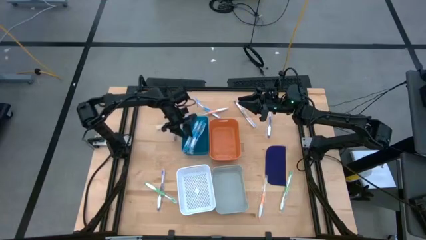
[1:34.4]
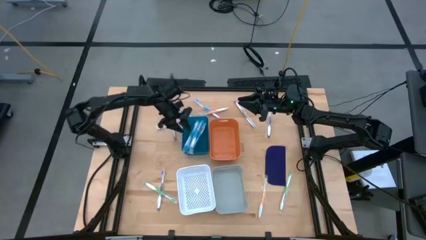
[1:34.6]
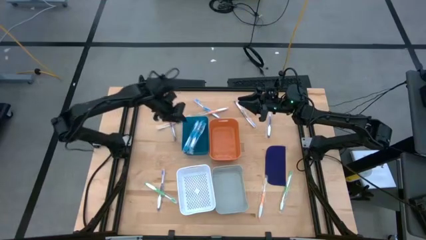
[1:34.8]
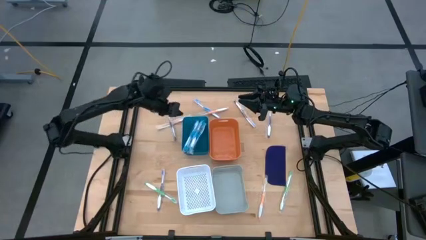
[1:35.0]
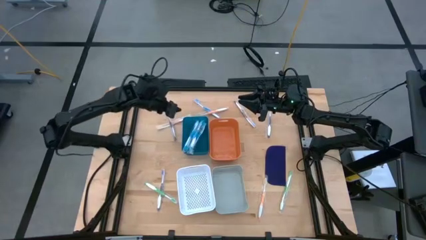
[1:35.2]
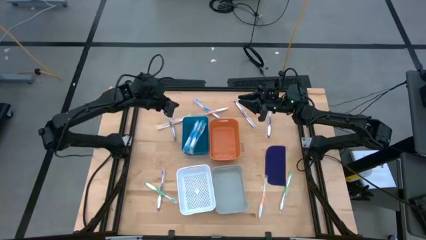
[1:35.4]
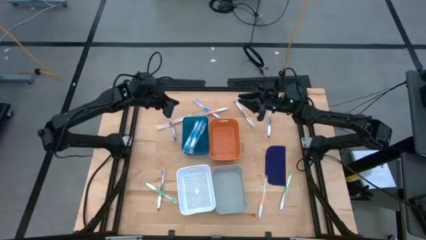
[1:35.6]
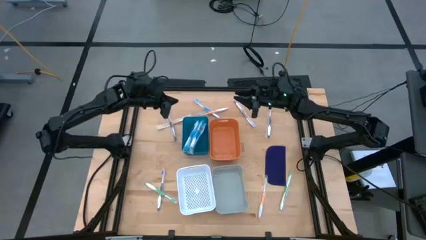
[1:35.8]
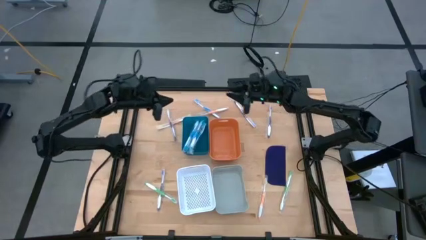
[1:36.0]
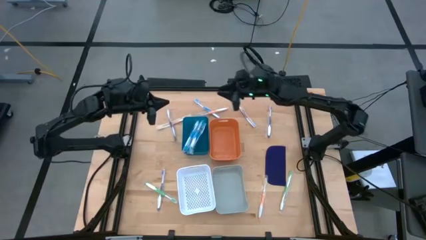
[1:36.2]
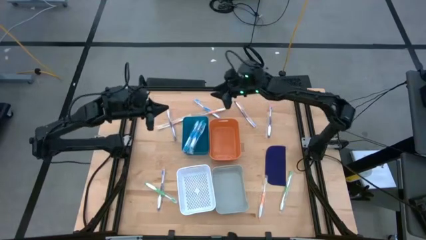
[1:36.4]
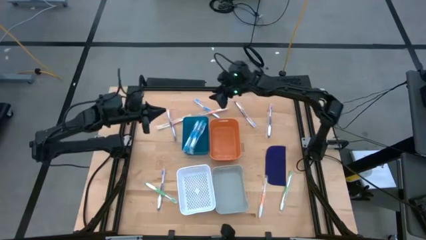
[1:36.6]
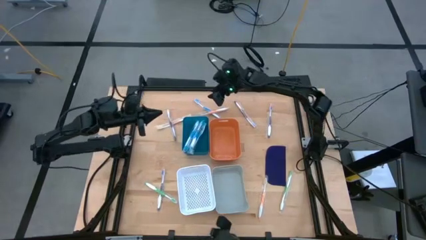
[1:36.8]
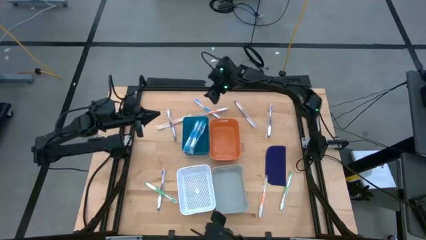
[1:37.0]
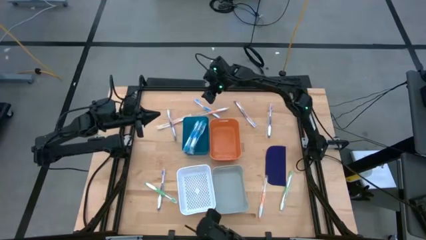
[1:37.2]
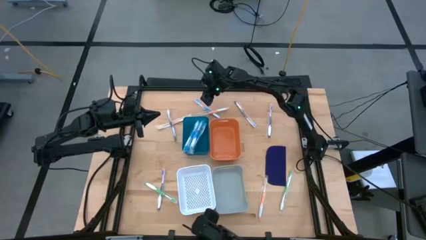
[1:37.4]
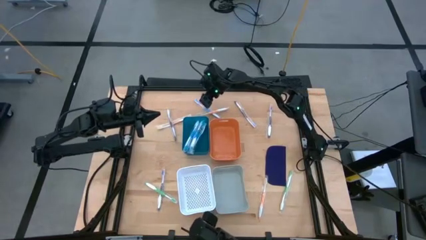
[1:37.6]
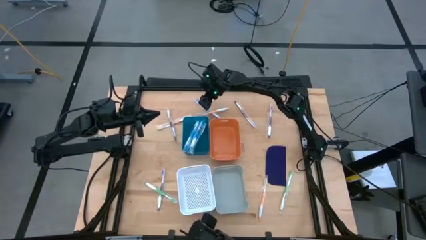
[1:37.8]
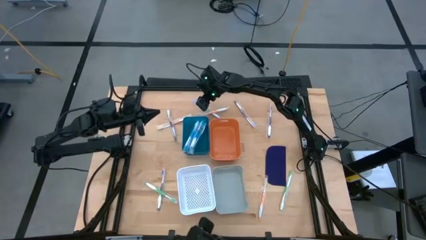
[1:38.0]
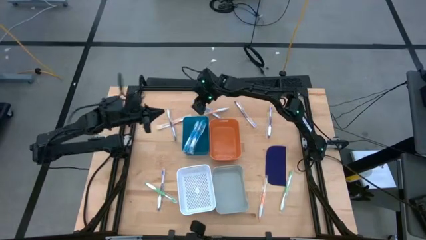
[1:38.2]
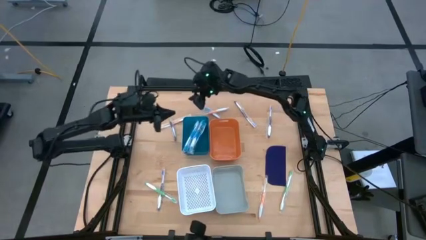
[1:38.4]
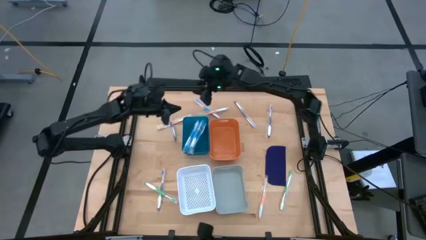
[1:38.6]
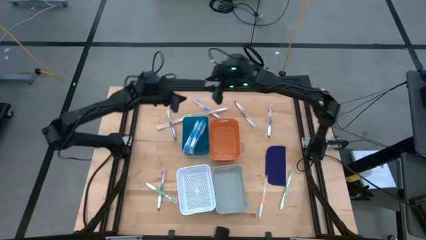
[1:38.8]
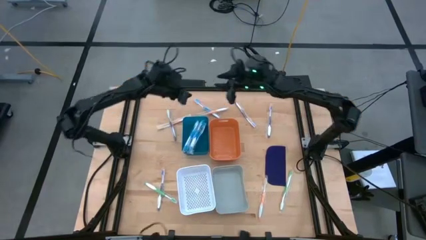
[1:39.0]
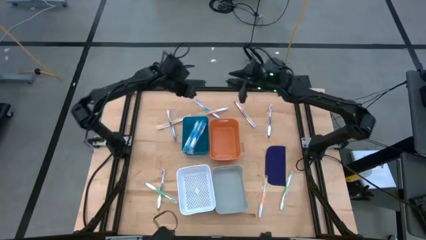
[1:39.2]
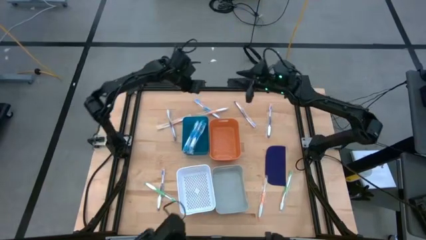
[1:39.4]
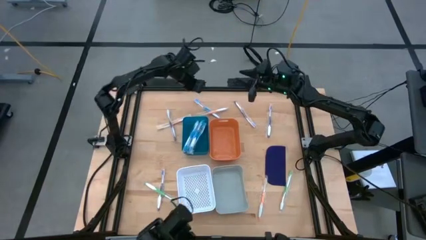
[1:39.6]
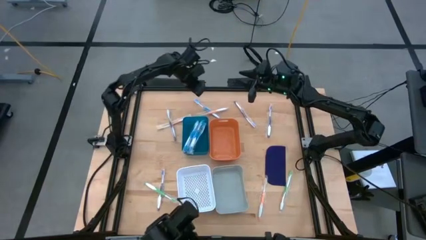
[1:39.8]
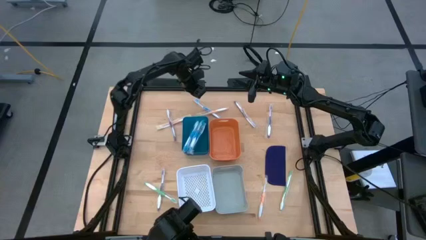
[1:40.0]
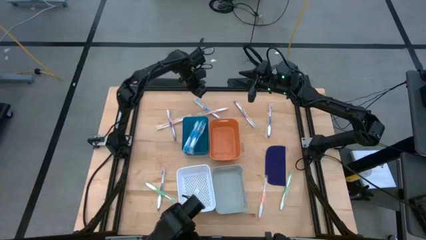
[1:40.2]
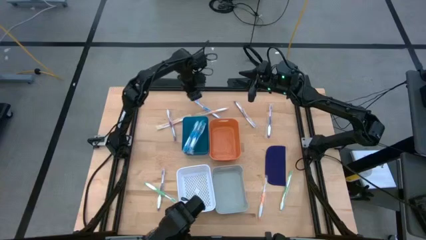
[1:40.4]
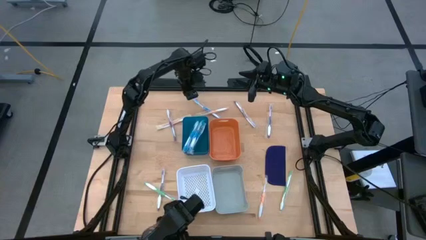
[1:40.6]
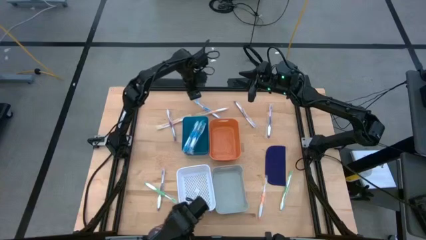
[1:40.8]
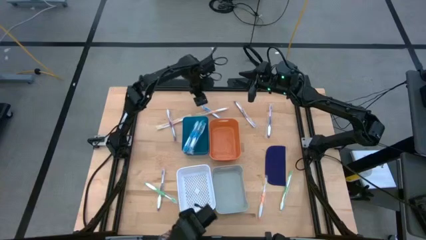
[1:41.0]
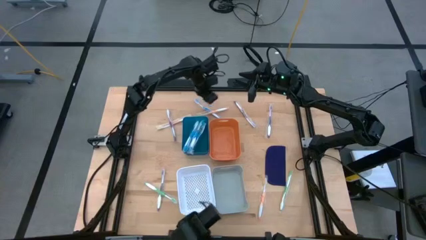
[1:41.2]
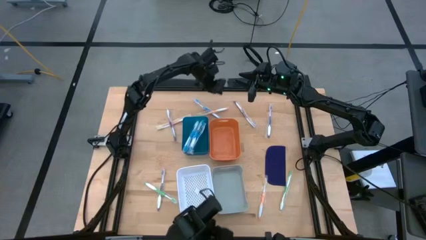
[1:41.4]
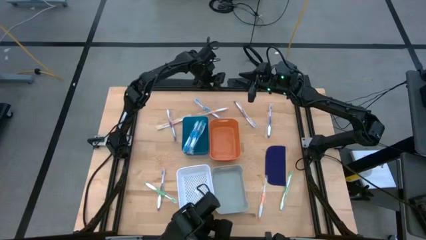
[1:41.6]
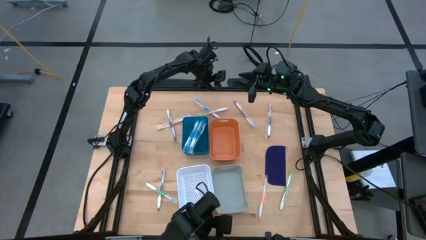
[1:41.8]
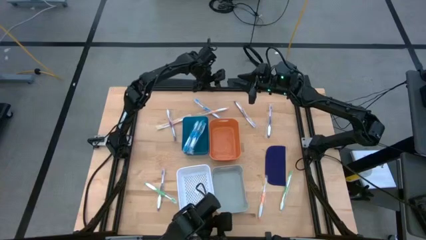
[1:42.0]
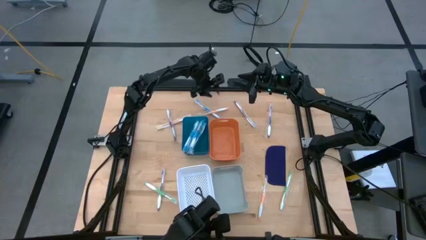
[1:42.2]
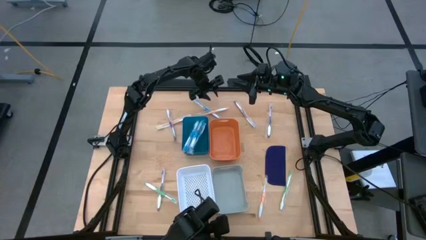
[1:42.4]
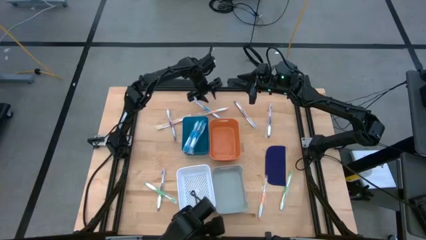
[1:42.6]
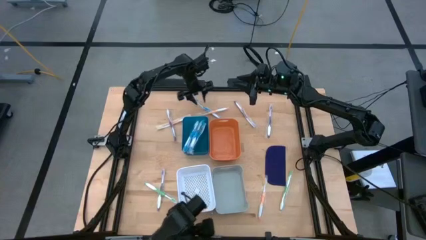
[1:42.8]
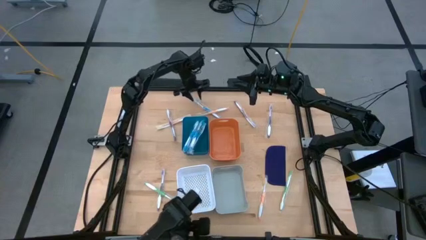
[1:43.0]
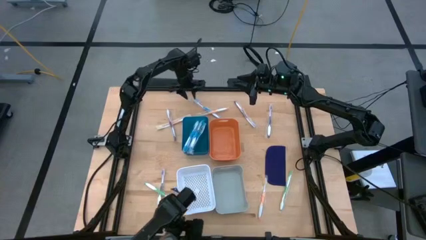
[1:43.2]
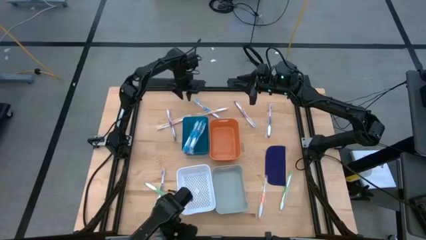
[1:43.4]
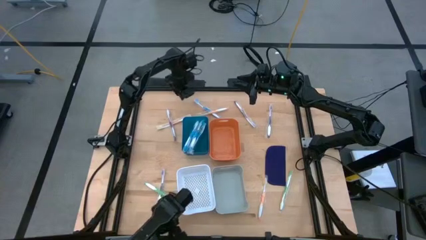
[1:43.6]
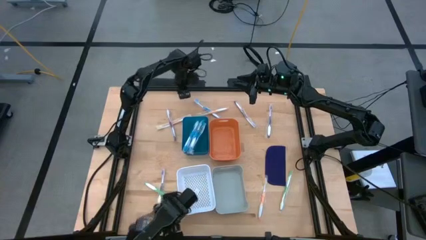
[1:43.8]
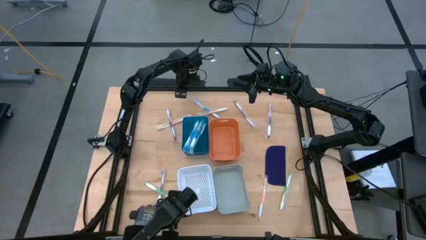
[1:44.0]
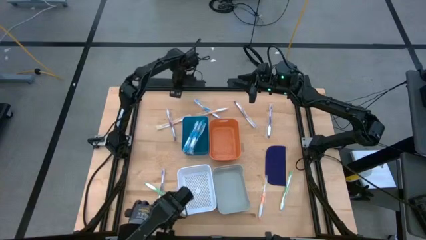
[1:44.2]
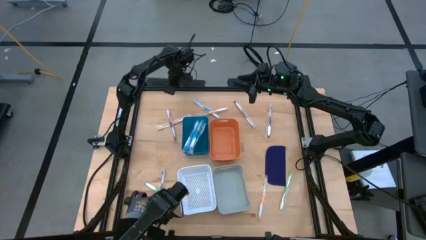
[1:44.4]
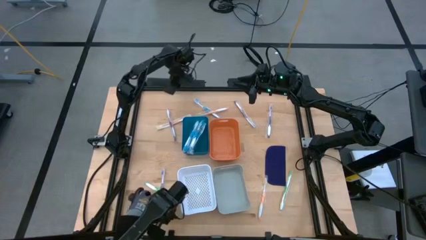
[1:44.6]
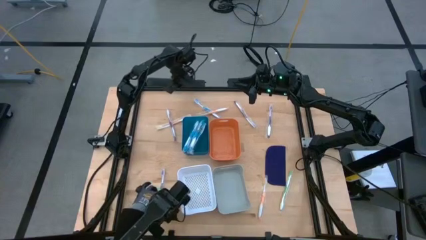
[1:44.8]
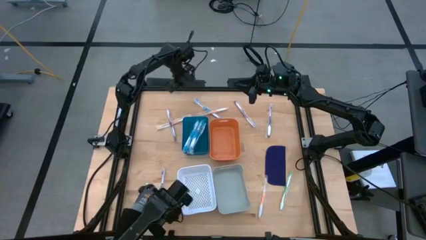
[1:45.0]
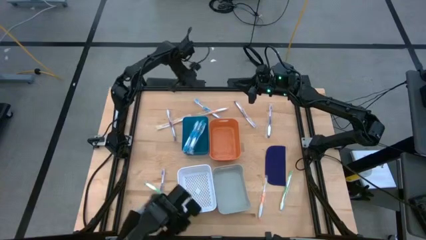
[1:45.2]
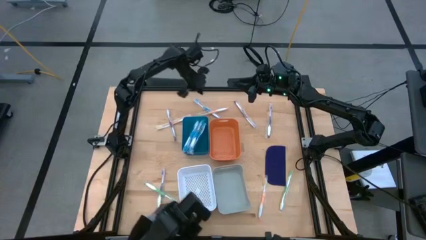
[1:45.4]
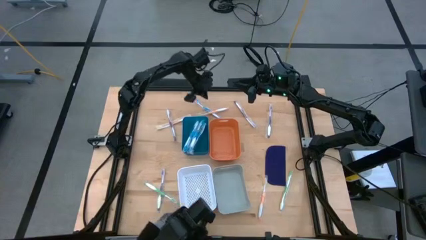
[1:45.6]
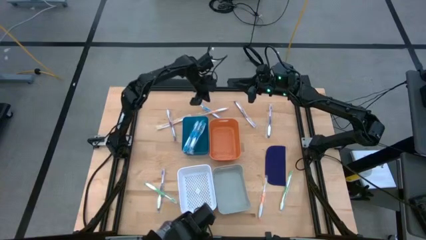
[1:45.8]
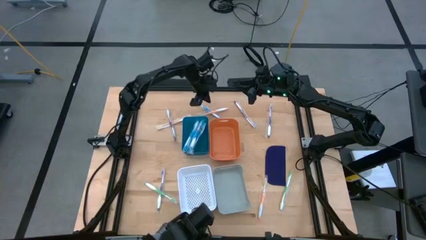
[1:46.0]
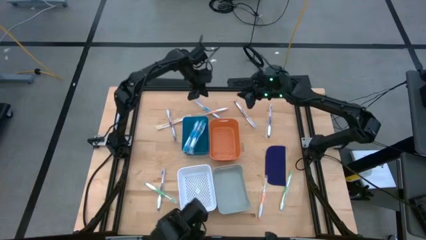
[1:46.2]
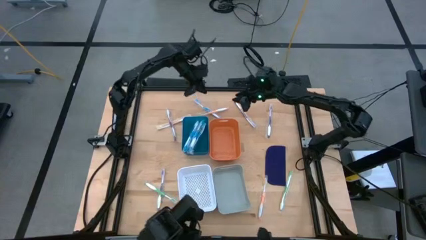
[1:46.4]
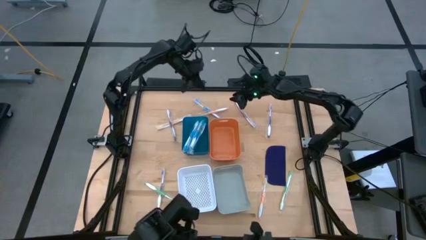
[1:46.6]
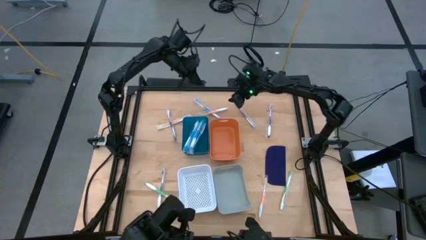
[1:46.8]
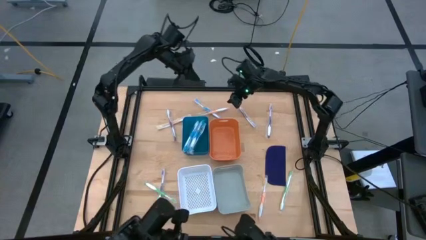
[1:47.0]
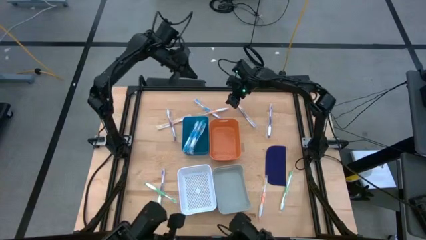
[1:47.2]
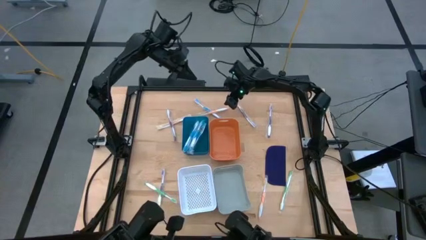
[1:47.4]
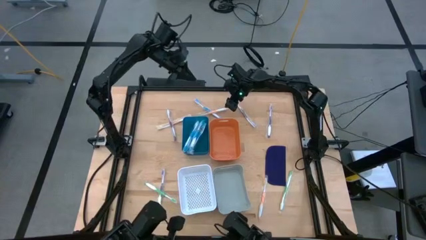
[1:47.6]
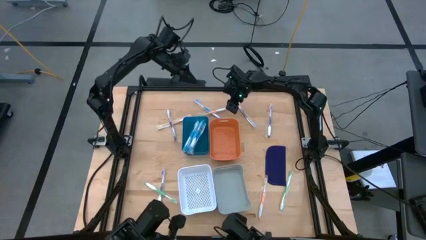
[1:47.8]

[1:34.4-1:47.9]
Task: Pick & Place Toothbrushes
Put the violet toothbrush into the orange bin

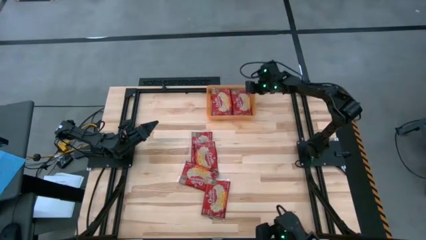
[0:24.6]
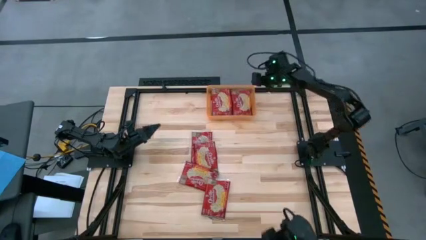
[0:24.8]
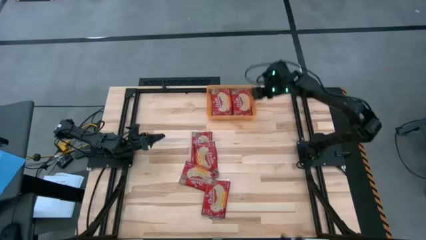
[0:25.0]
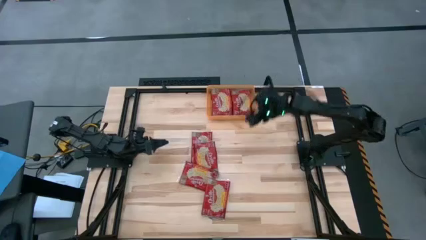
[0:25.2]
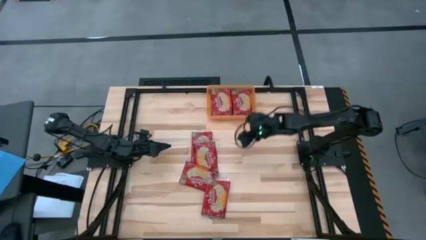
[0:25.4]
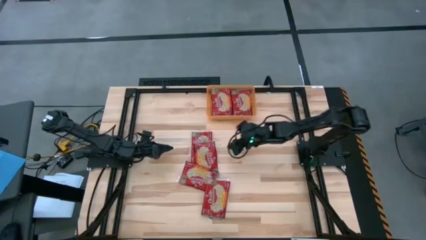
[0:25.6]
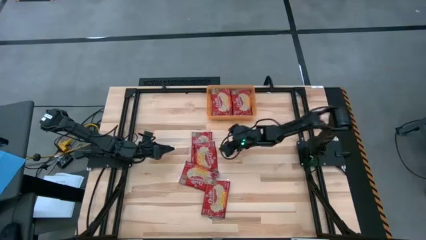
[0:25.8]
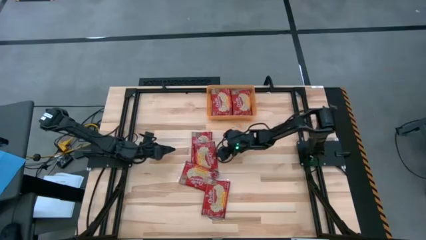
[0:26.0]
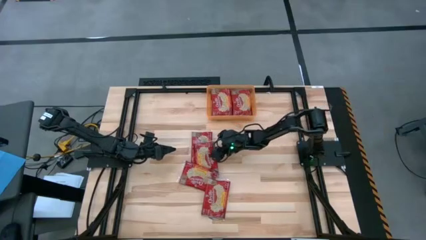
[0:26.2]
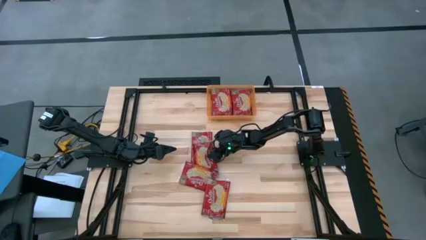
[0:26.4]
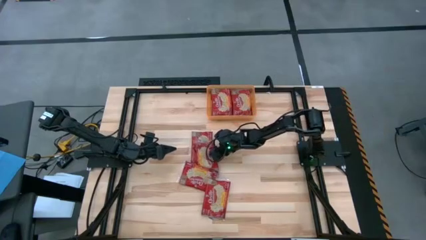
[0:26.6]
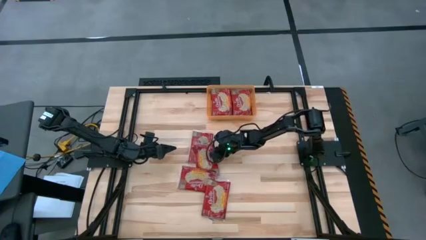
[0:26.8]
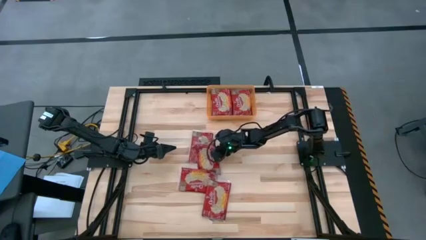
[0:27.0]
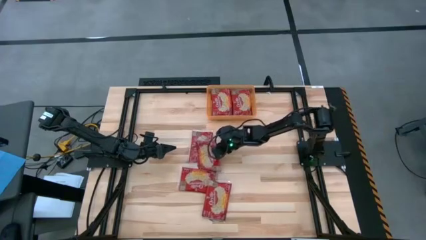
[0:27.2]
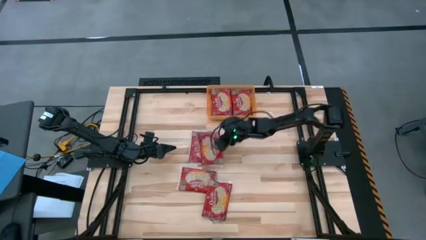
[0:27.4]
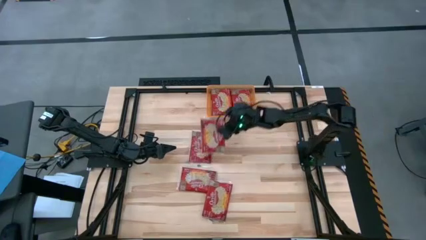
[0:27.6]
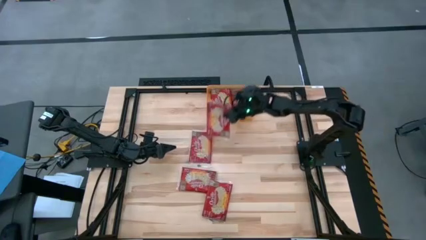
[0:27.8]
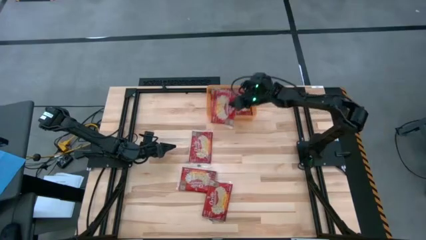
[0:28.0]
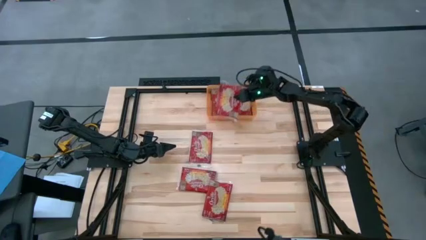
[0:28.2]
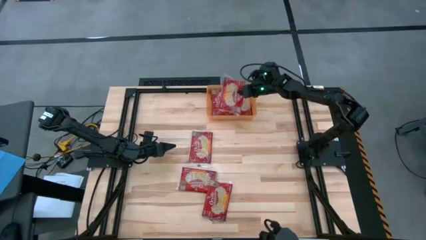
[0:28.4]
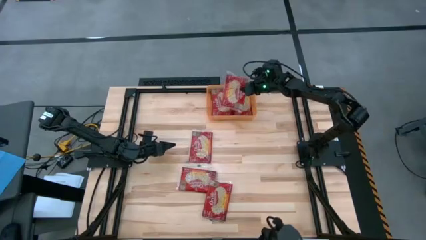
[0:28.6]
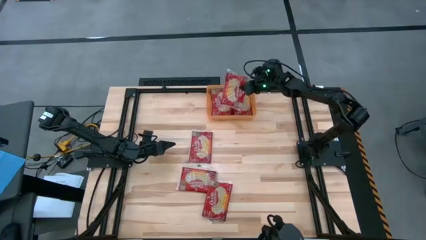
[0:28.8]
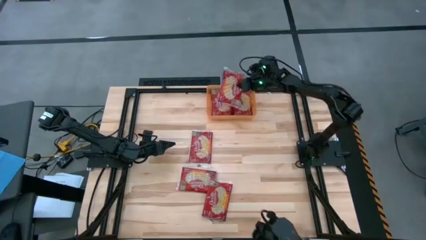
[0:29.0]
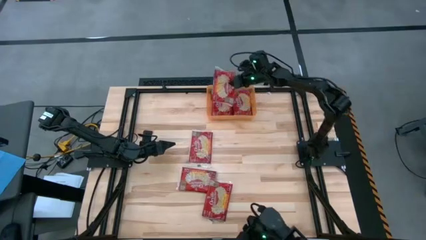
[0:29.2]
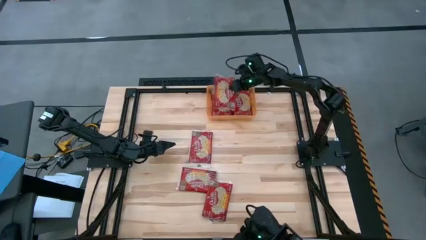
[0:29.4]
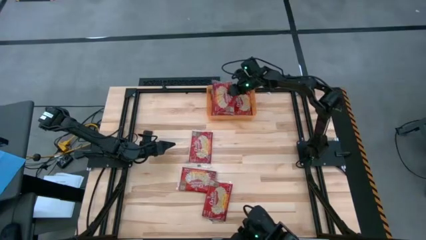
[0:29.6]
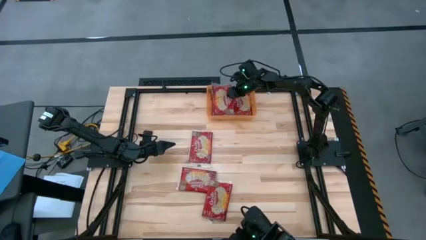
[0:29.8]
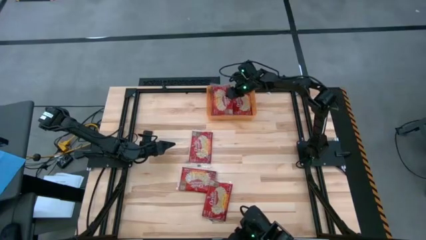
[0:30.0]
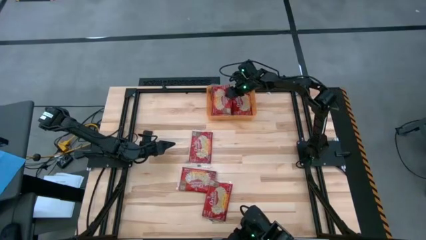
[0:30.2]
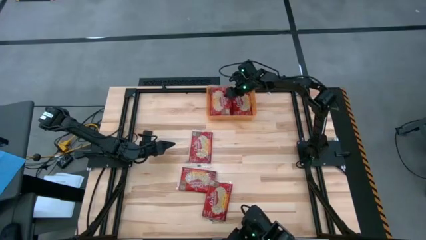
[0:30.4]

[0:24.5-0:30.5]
Task: Sort popcorn bags into baskets
Put the red popcorn bag into the orange bin
